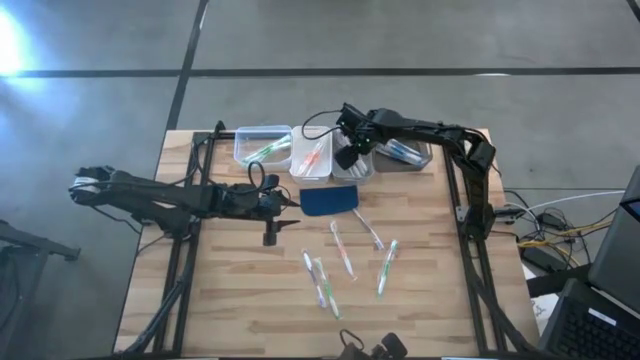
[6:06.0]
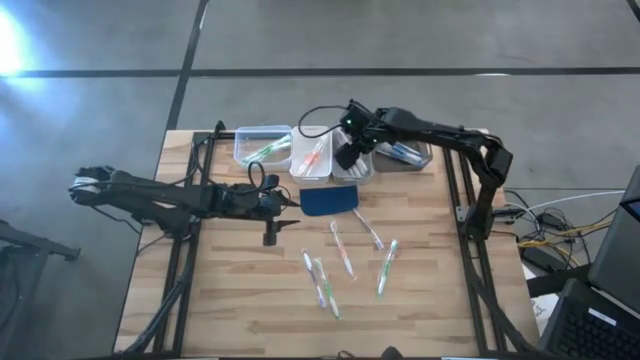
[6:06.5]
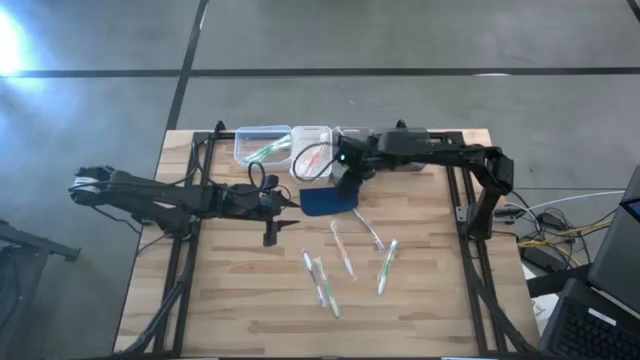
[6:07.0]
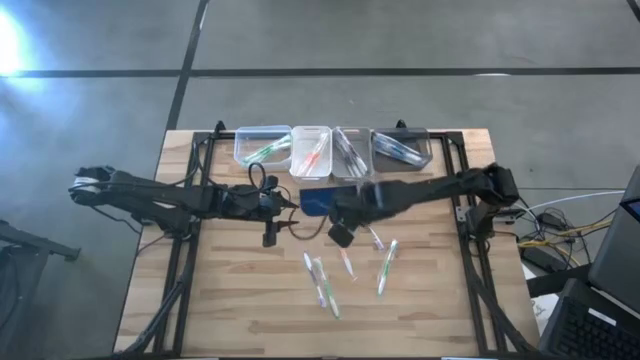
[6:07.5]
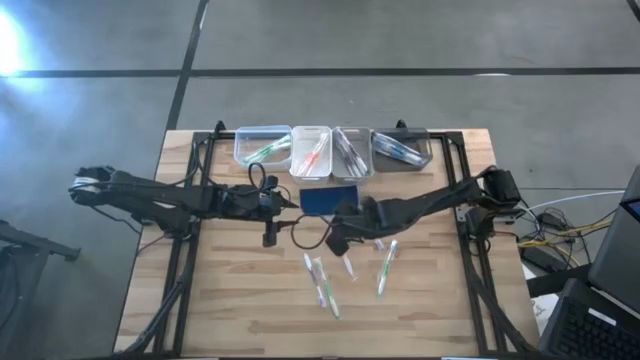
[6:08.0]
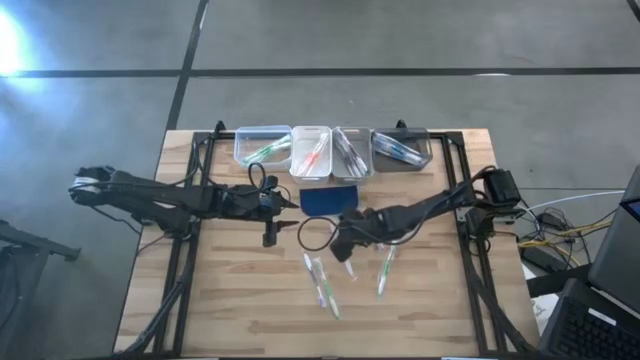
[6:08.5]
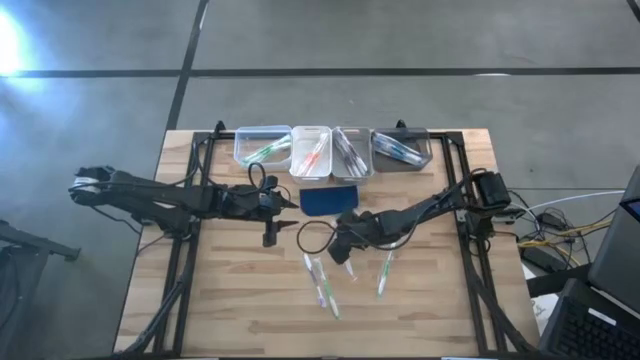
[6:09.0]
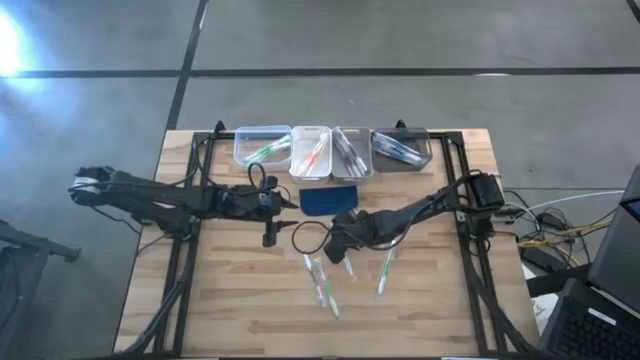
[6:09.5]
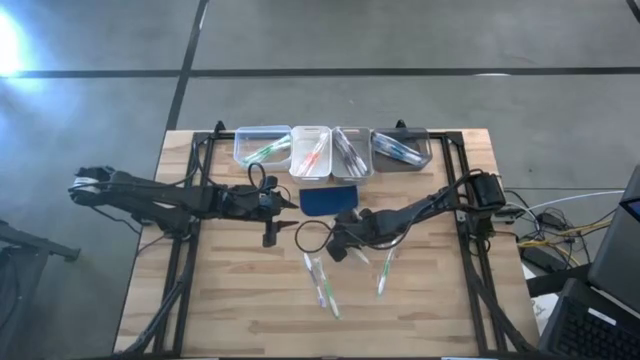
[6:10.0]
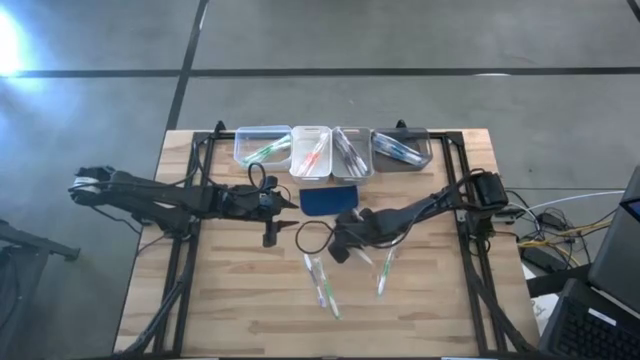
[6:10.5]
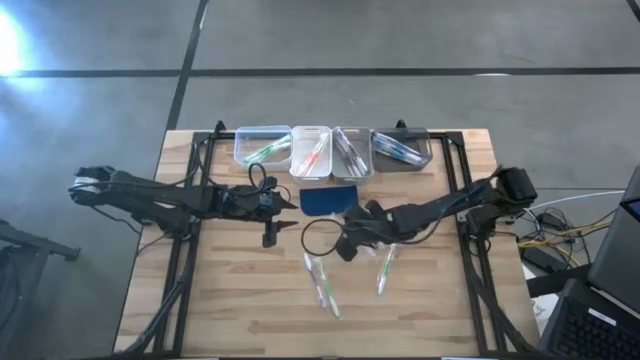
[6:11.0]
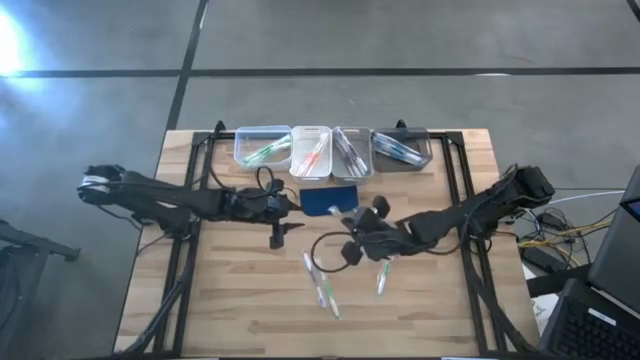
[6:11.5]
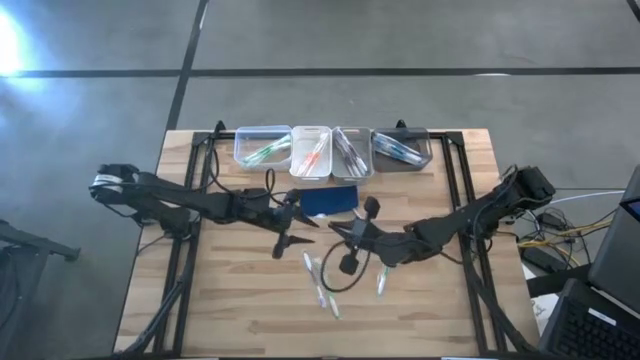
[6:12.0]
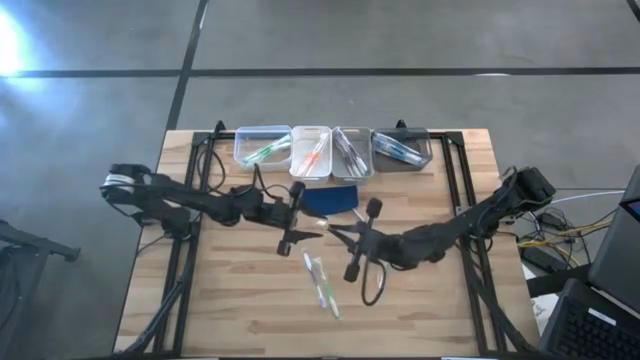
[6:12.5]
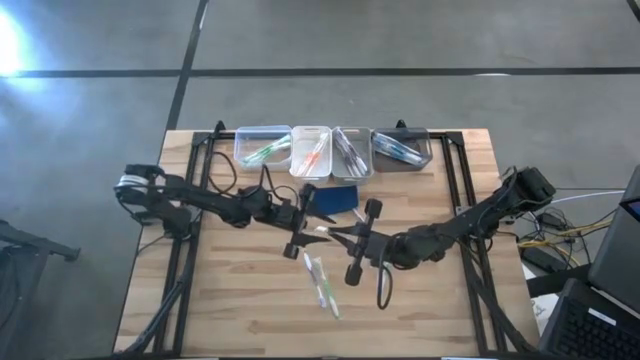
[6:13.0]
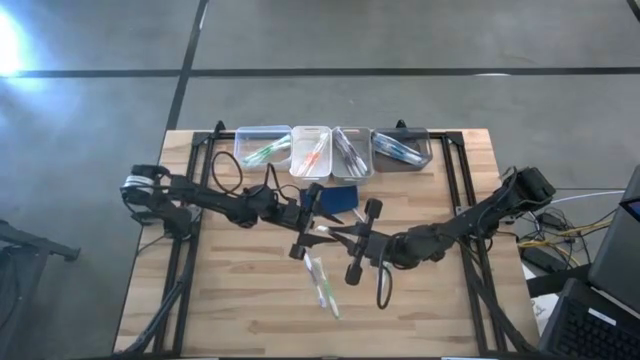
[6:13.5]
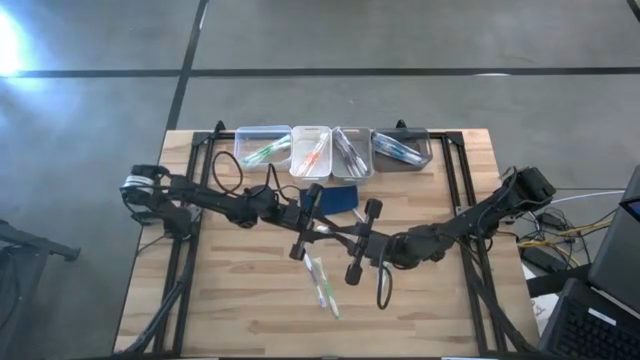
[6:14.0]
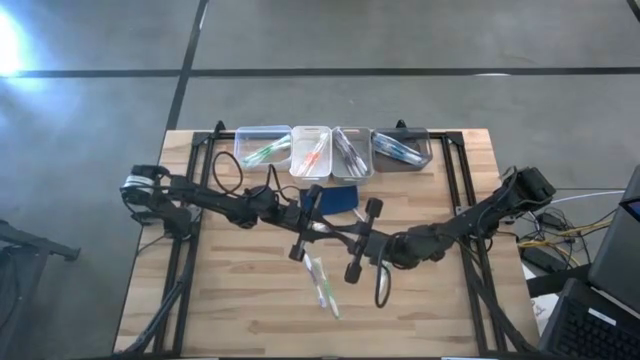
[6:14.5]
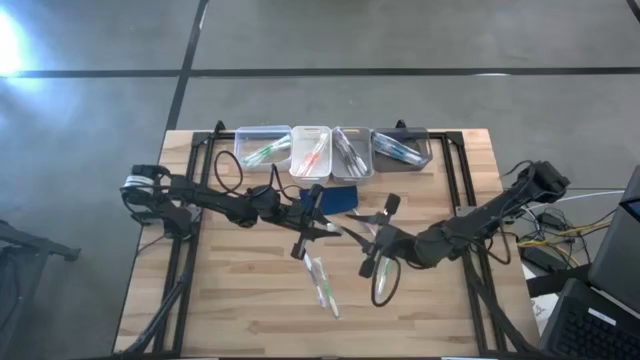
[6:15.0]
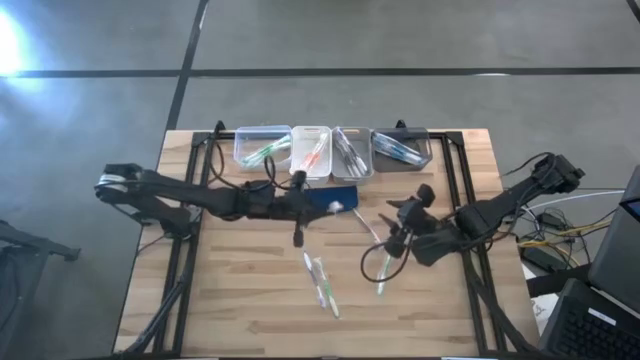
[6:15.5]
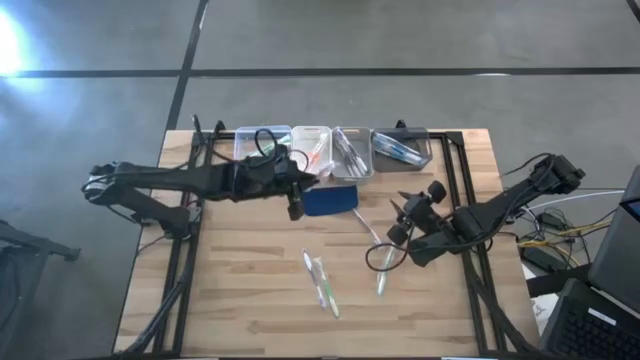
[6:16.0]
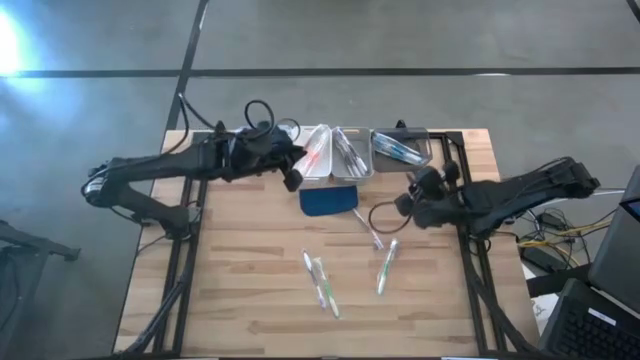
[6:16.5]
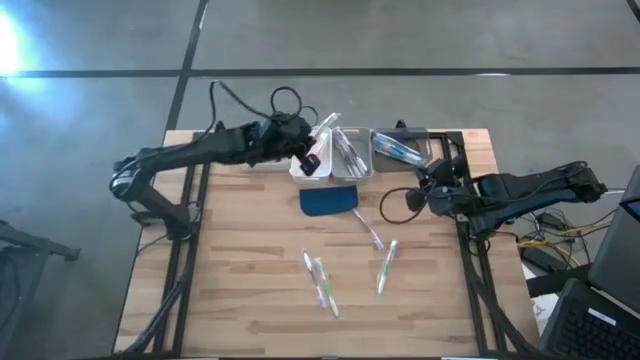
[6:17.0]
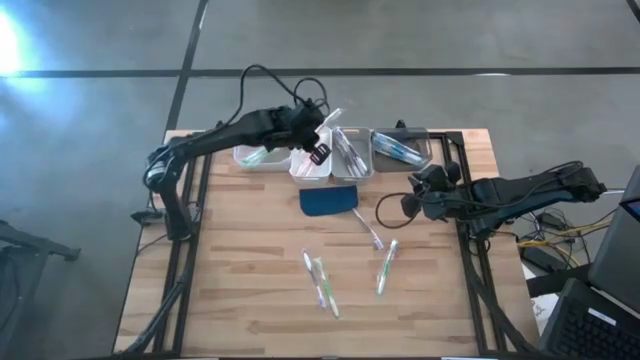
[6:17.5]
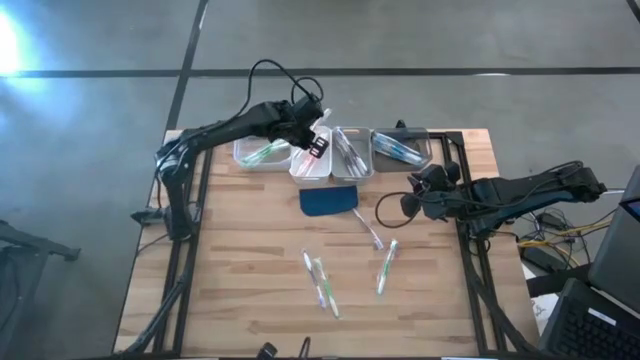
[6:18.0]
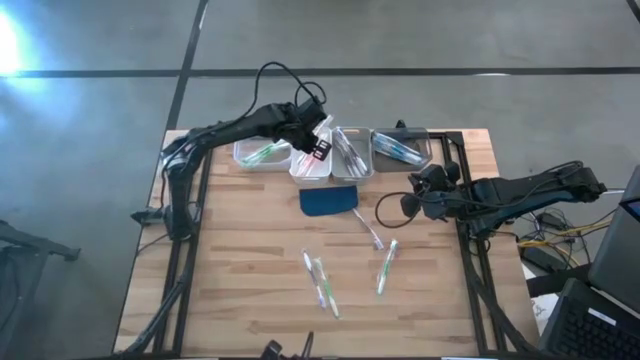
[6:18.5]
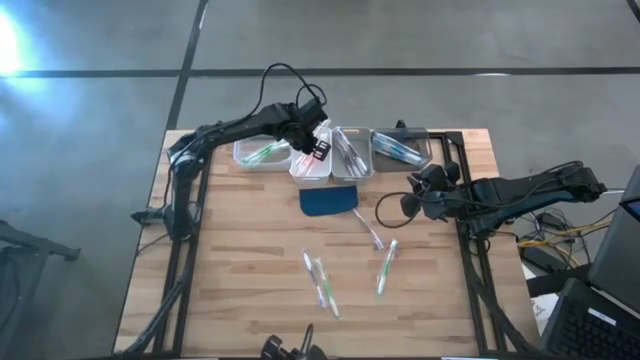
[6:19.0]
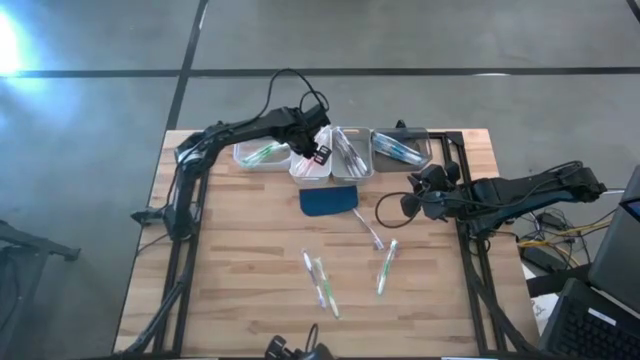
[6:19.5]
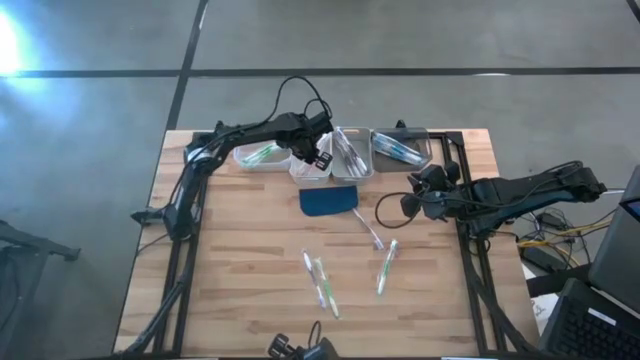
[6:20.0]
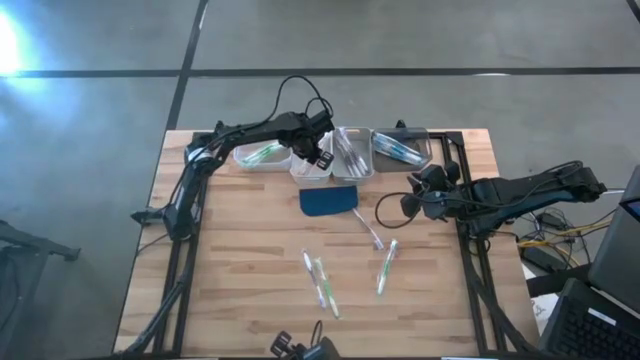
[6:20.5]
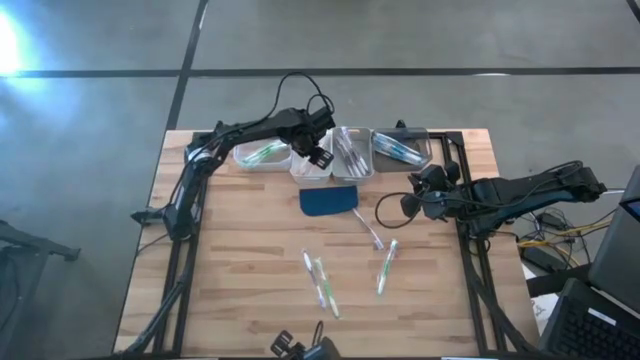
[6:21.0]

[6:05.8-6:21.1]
Task: Pick & Place Toothbrushes
Put the orange toothbrush into the white bin

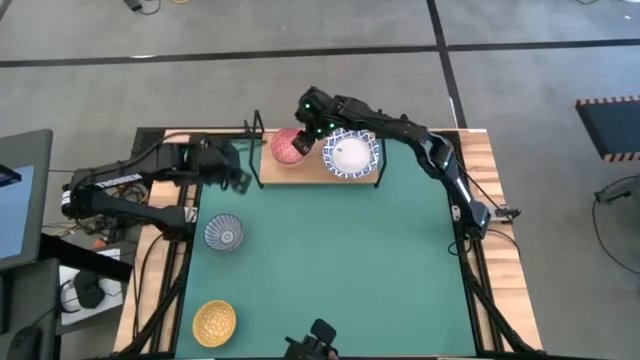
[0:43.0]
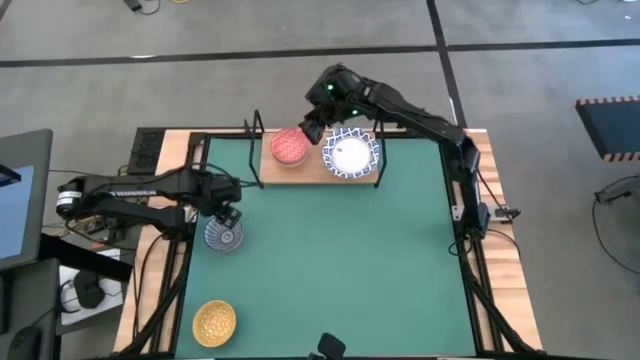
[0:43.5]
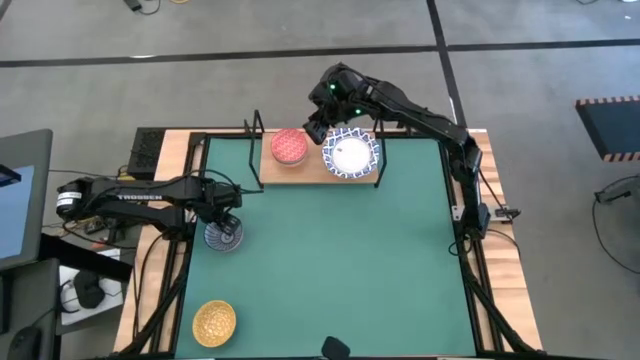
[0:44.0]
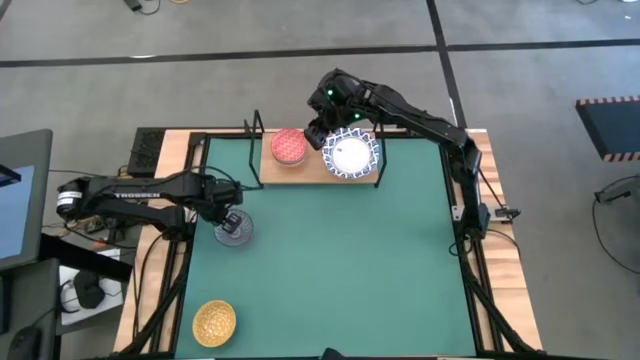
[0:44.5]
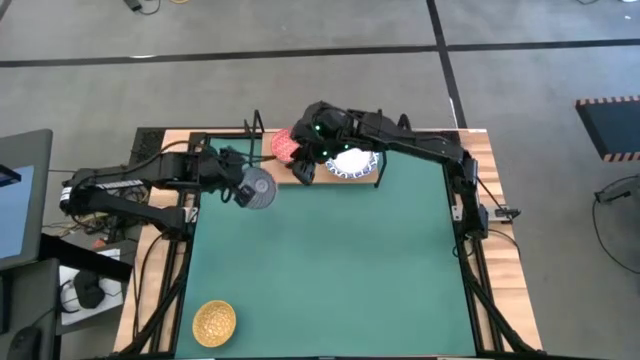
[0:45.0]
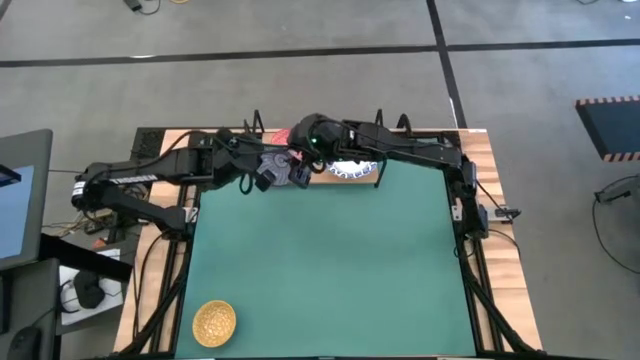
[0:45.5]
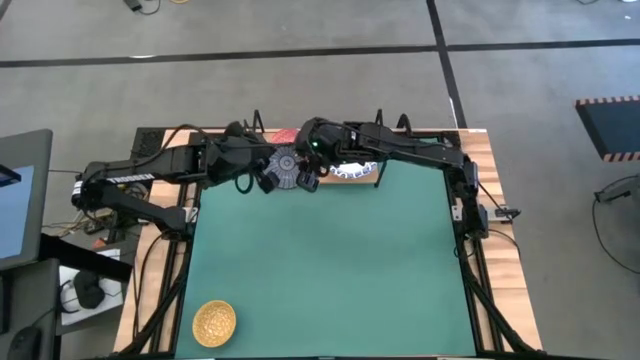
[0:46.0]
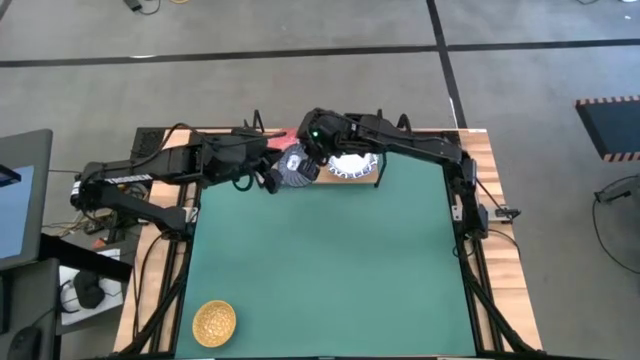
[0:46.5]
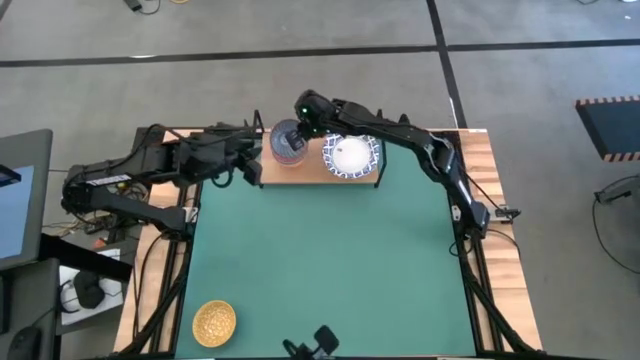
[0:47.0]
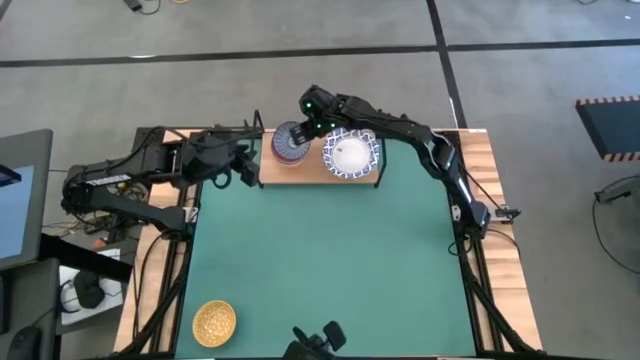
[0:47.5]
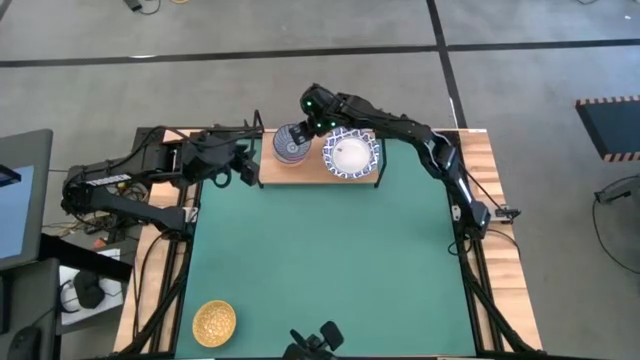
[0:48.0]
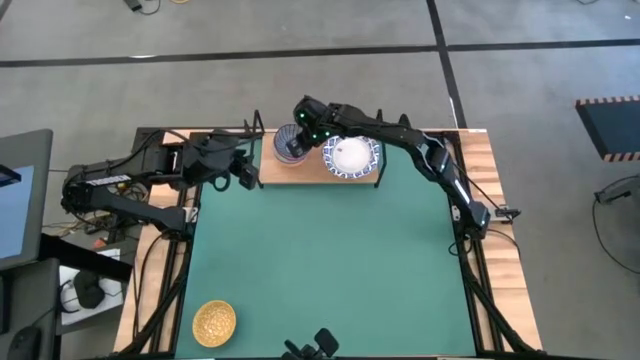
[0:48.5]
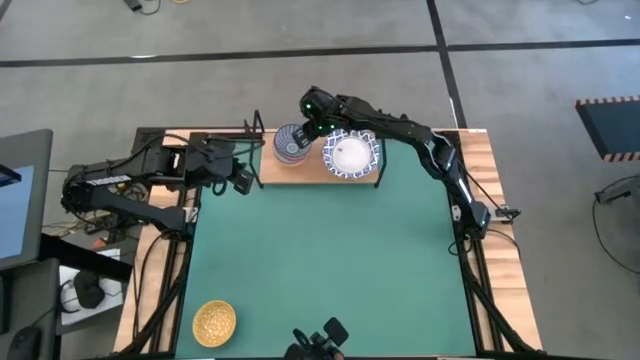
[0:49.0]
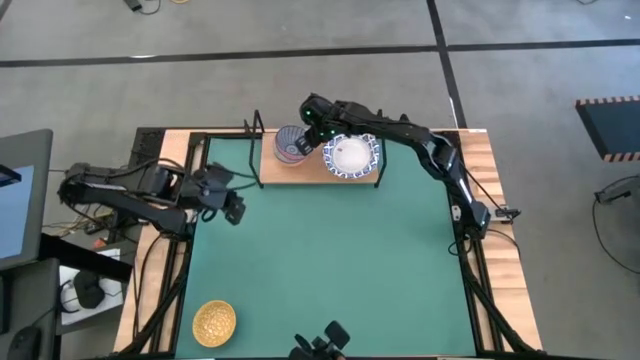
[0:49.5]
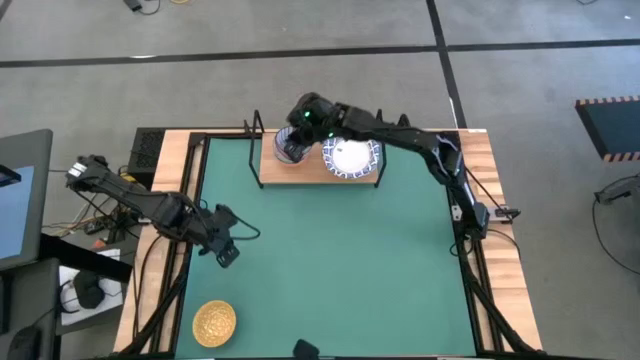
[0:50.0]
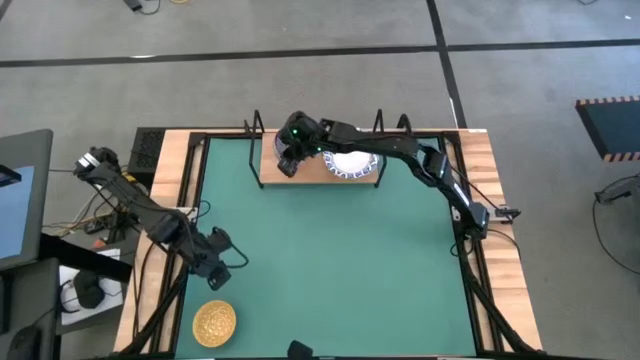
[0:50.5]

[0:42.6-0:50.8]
Task: Place and stack bowls onto a shelf
Stack the blue patterned bowl on top of the red bowl on the shelf
